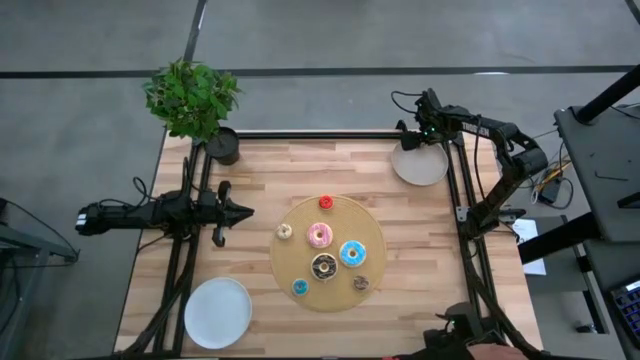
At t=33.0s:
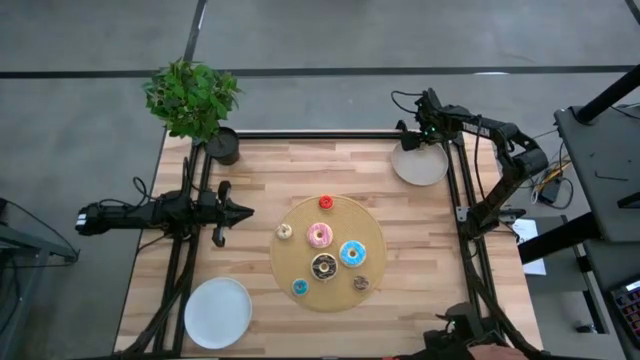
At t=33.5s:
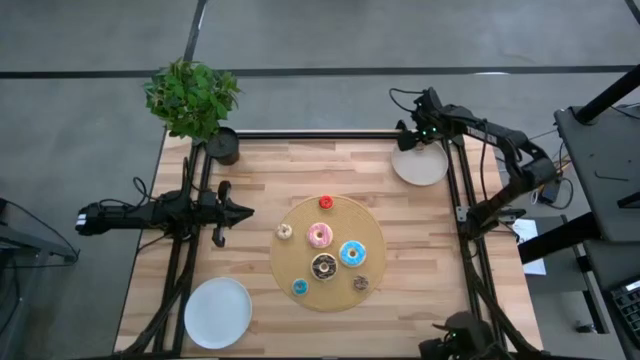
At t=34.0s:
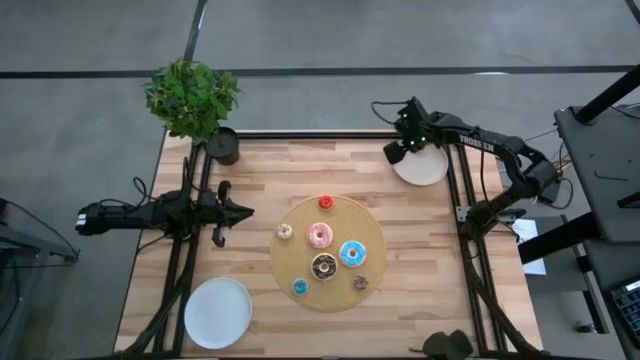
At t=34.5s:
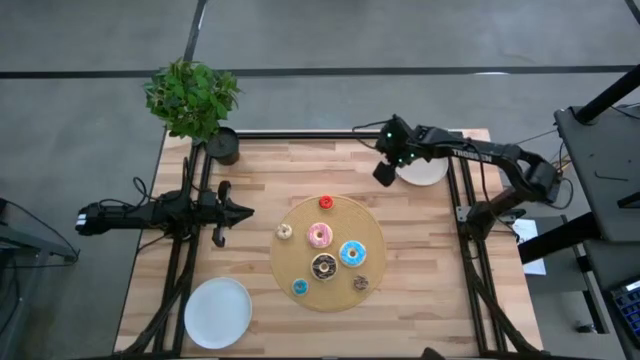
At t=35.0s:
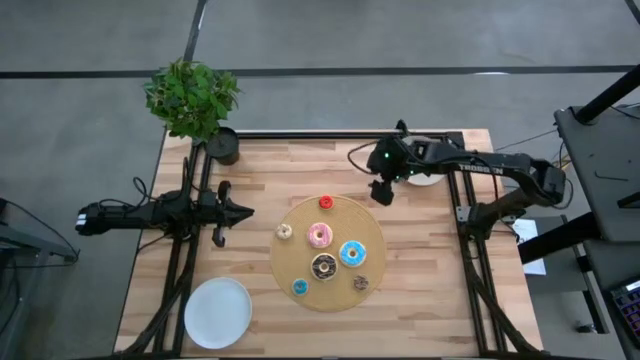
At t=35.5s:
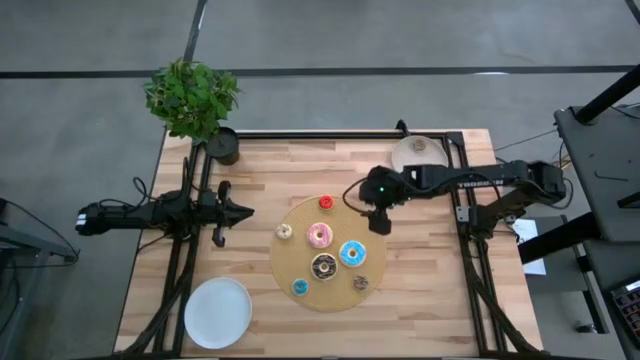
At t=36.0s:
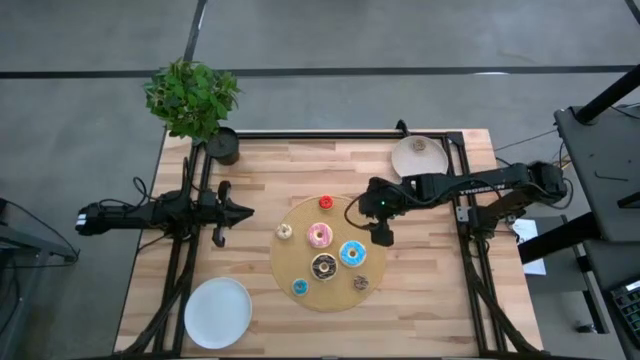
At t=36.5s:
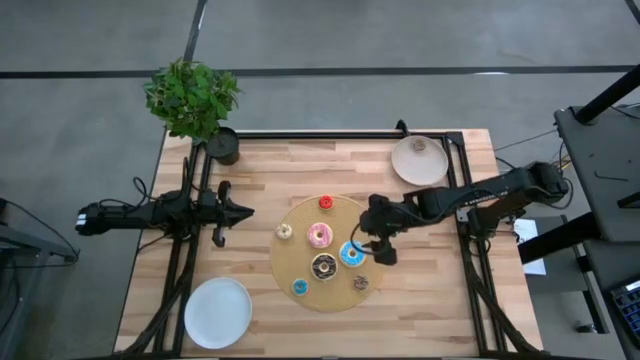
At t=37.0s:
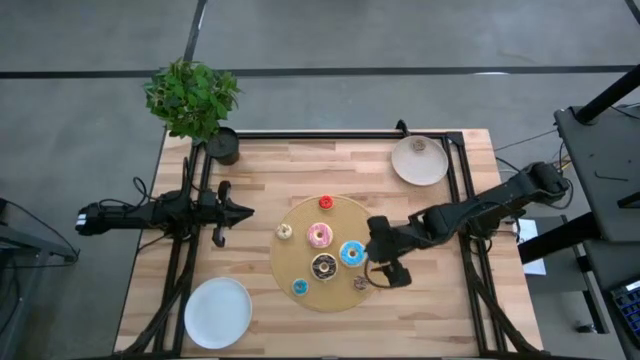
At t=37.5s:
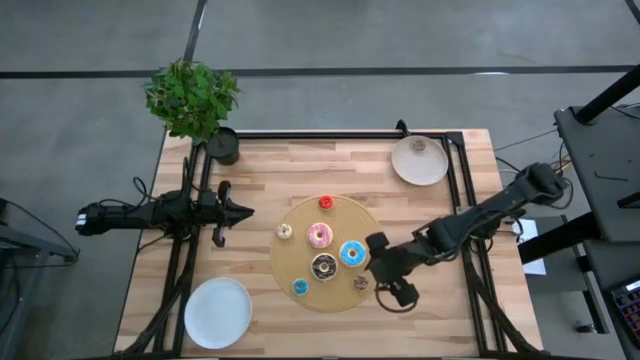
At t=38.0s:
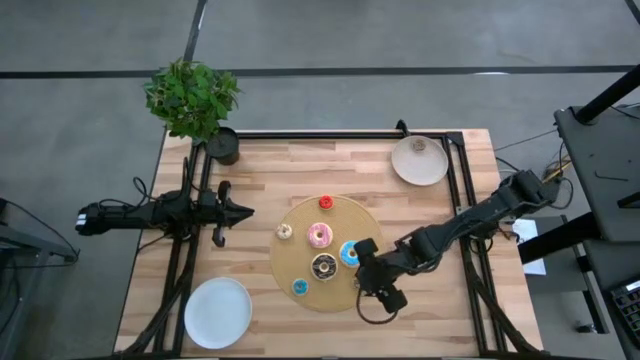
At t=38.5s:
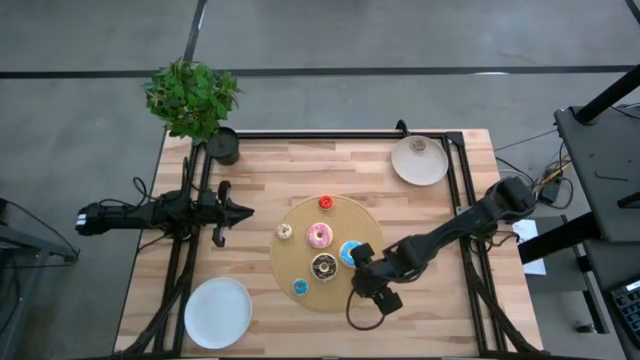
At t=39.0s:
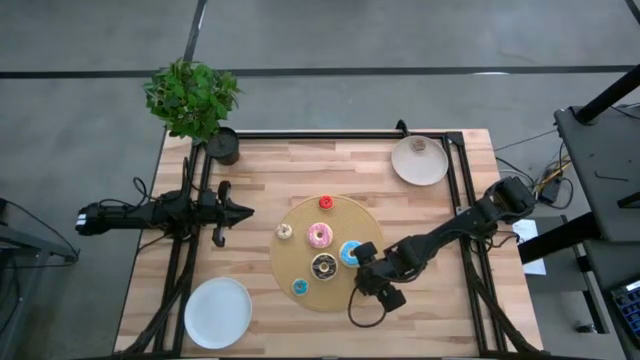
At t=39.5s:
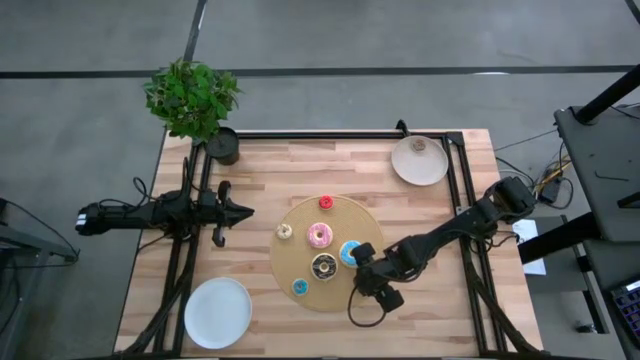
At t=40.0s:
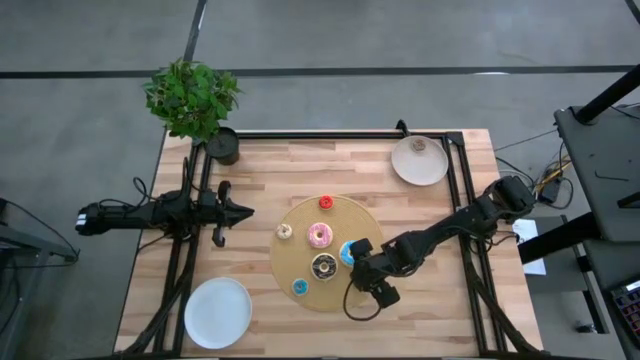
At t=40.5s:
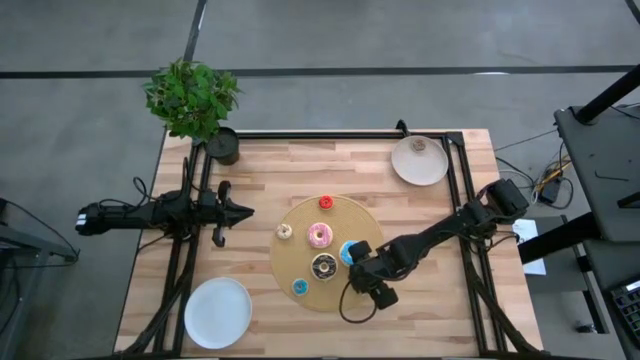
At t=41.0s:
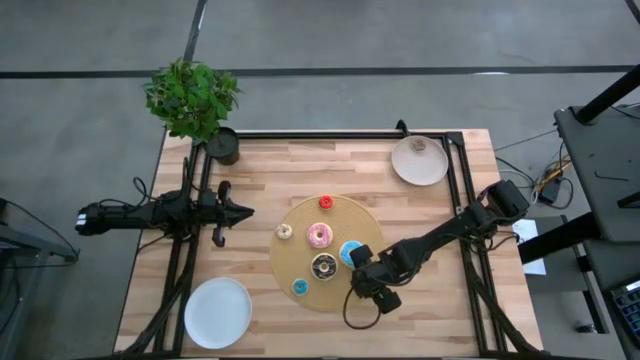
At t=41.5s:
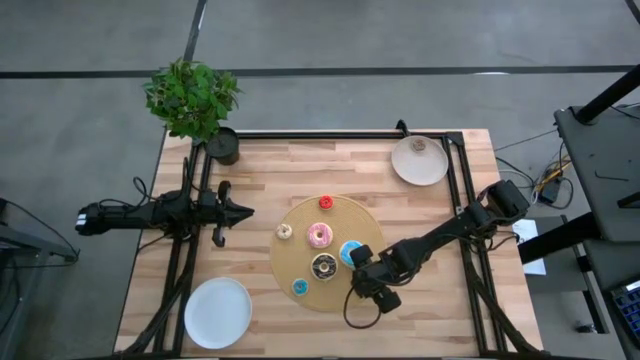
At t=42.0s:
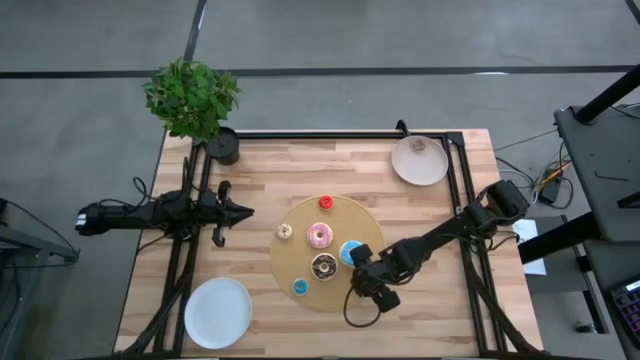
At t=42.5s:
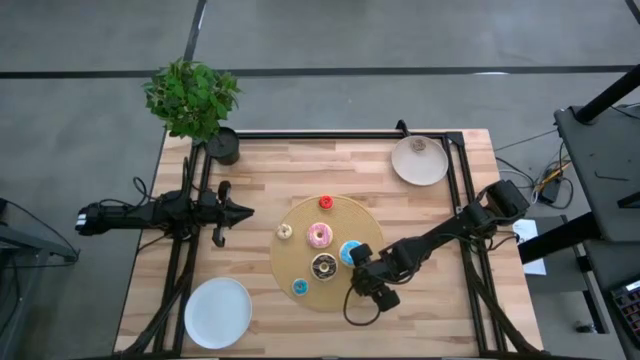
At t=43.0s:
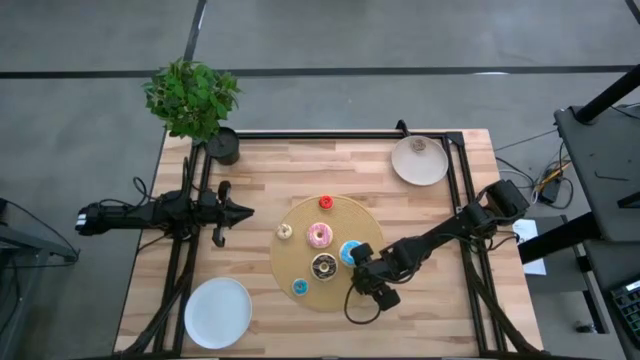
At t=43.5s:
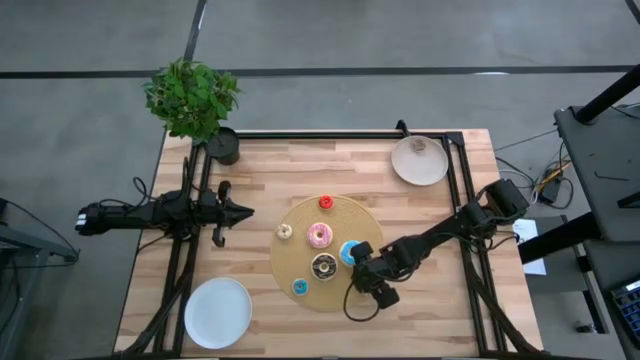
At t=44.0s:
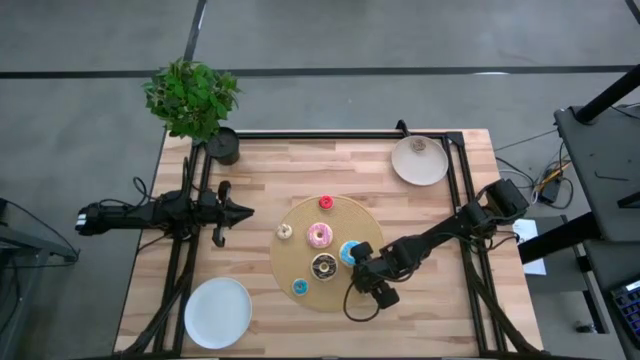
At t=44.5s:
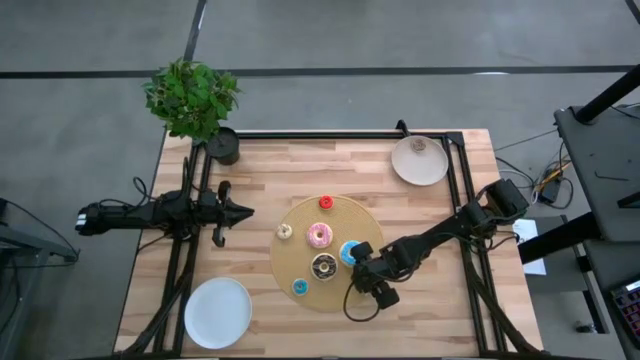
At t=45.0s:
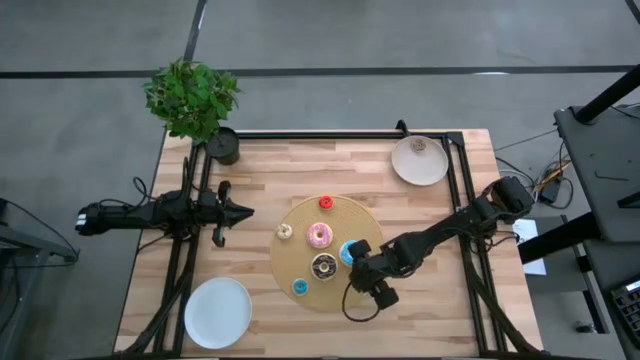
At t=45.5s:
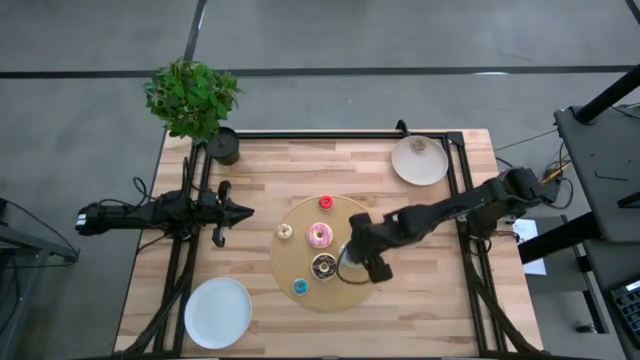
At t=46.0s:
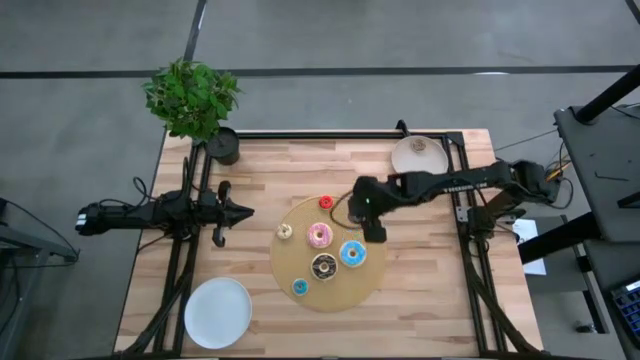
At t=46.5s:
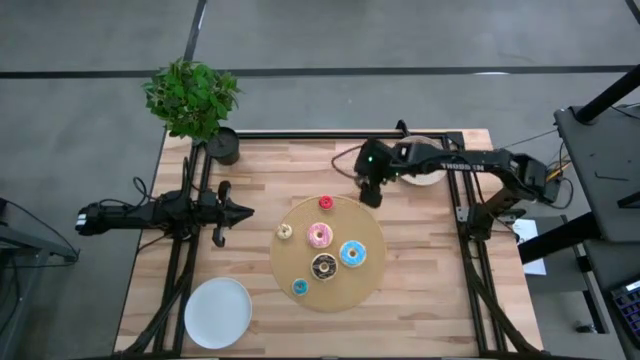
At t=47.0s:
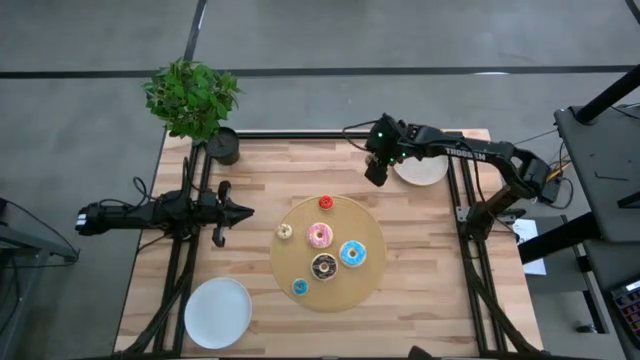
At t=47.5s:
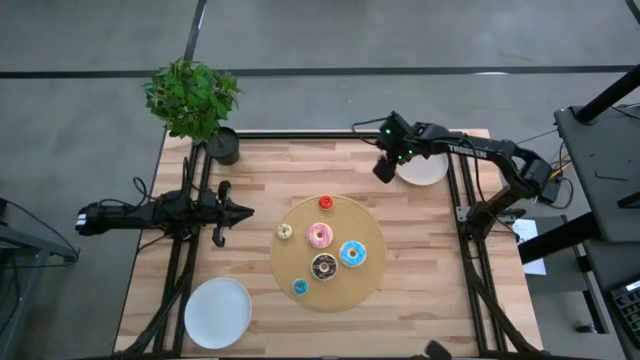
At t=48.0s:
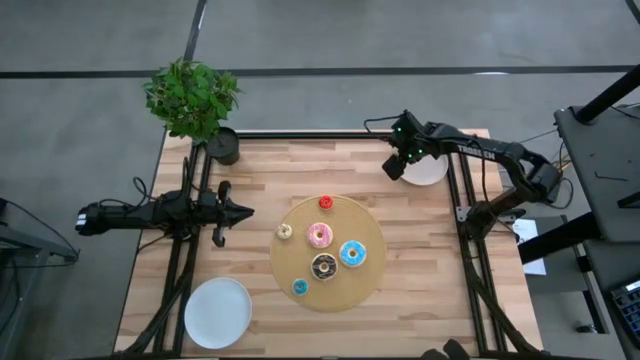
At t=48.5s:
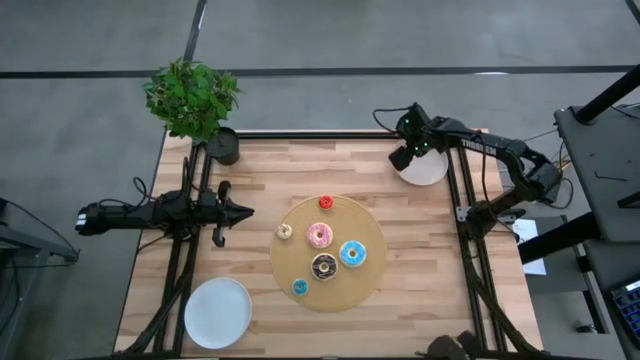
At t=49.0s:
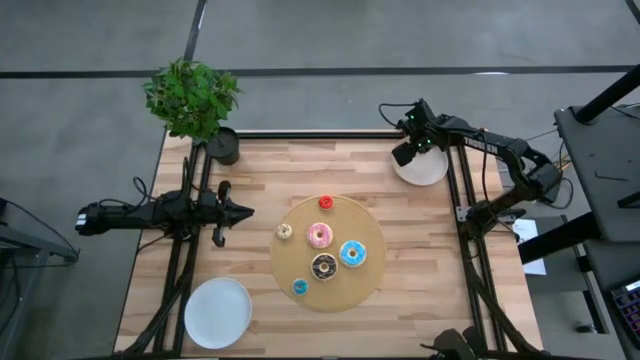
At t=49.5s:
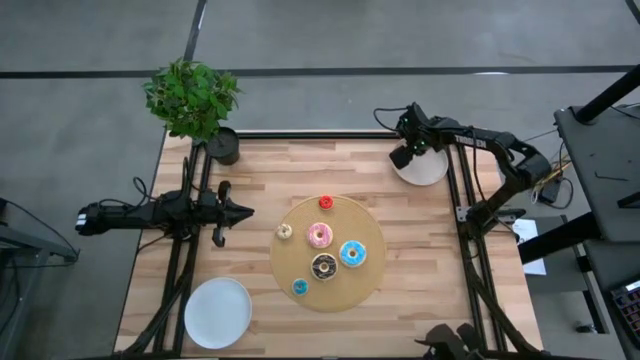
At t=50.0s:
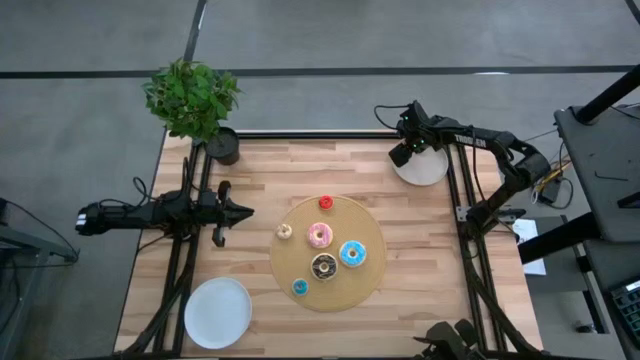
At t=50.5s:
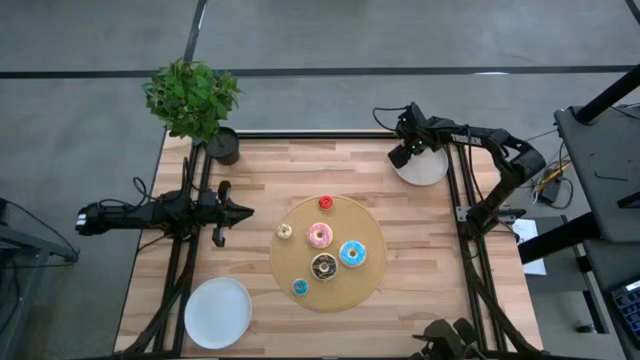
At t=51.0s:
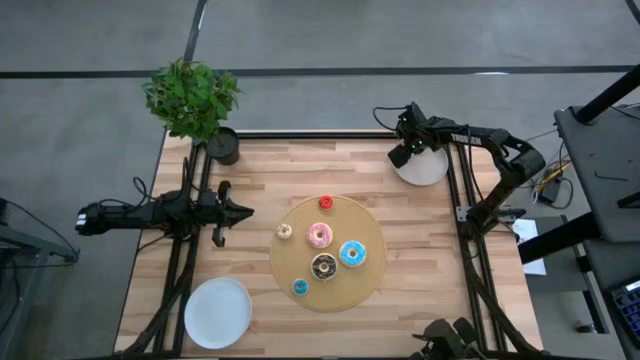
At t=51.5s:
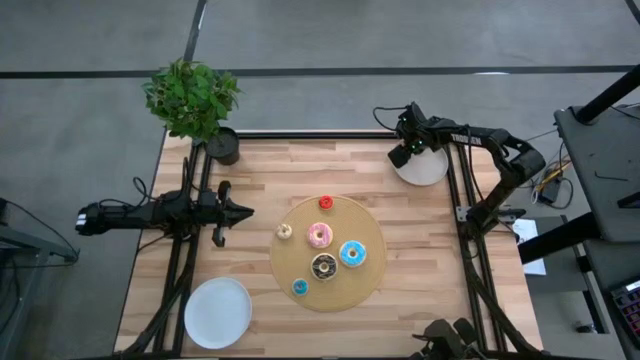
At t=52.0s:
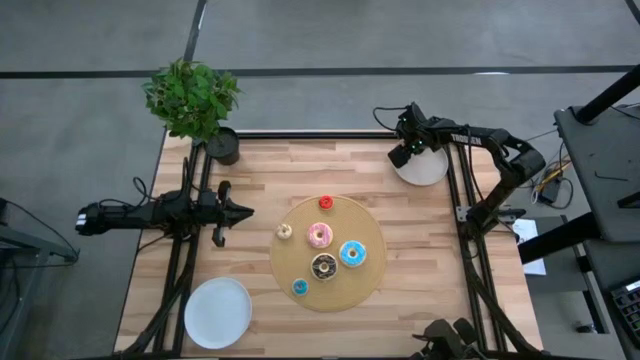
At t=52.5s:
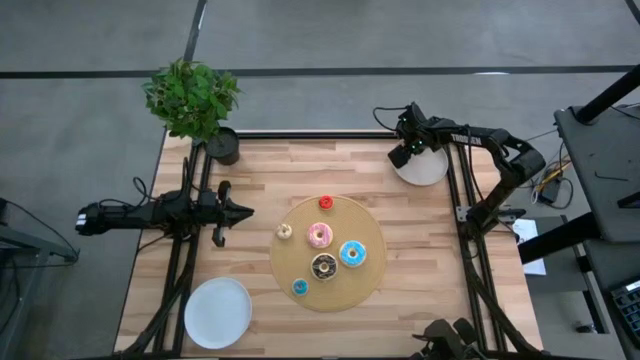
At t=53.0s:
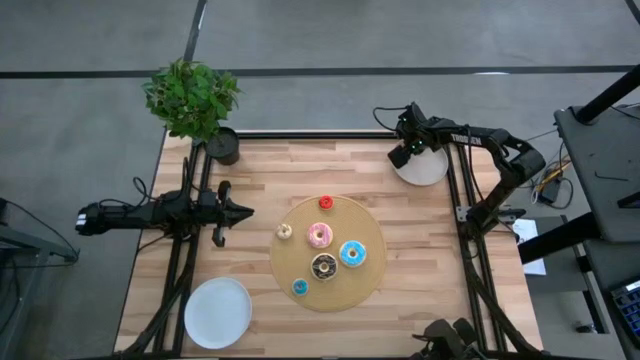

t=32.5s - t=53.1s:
Task: Pick & Place donuts
Put the small brown donut on the gray plate
